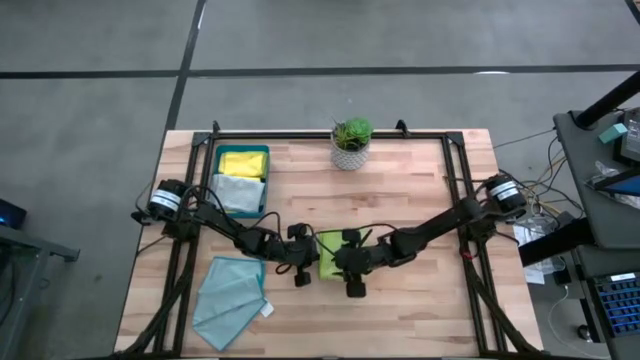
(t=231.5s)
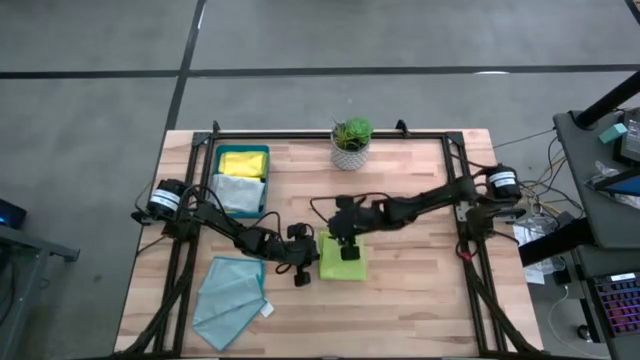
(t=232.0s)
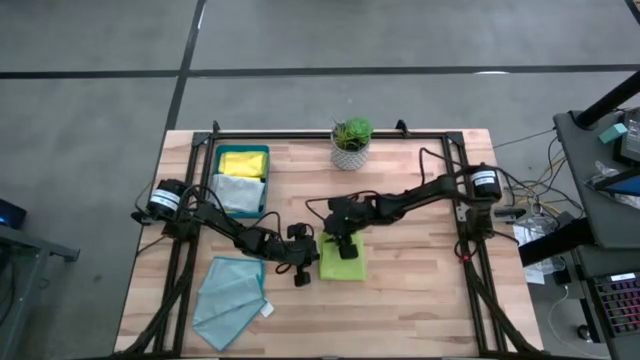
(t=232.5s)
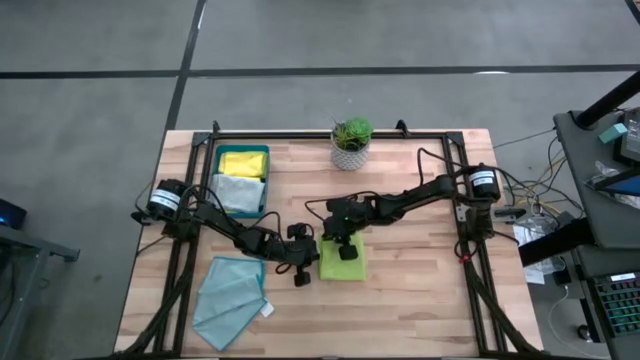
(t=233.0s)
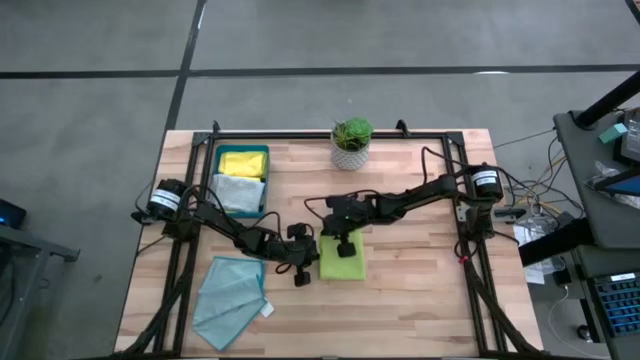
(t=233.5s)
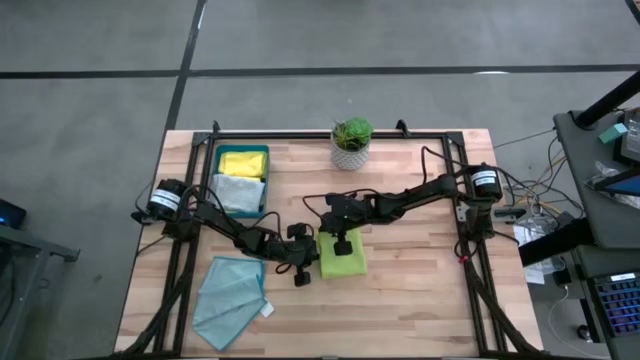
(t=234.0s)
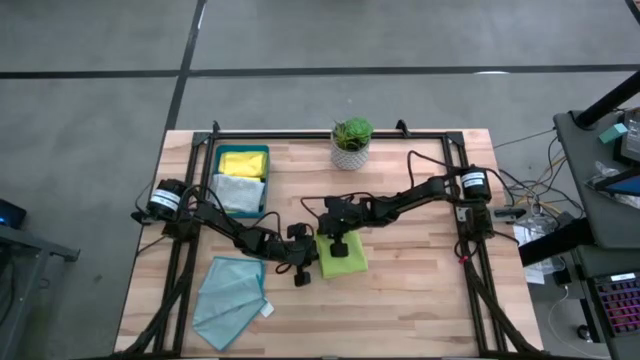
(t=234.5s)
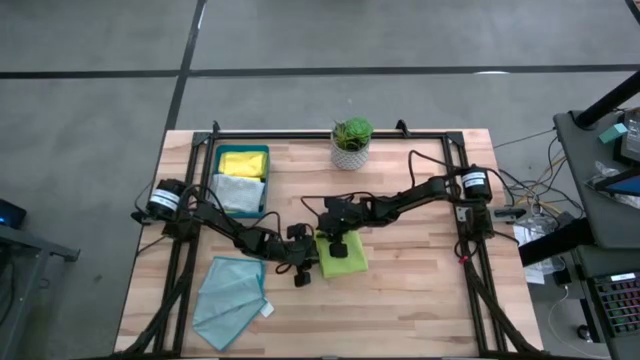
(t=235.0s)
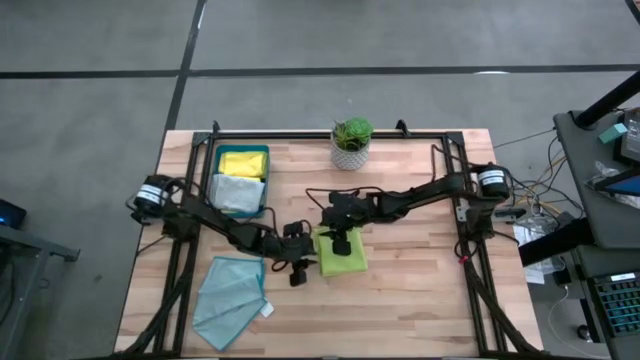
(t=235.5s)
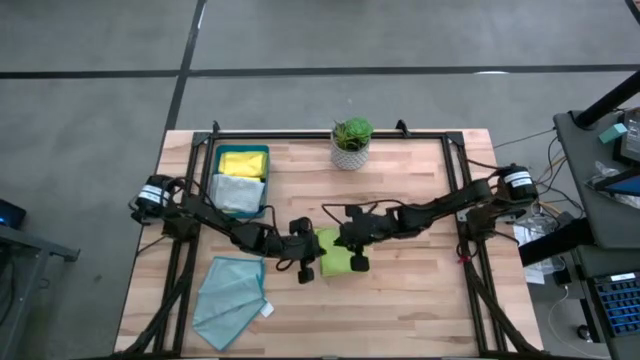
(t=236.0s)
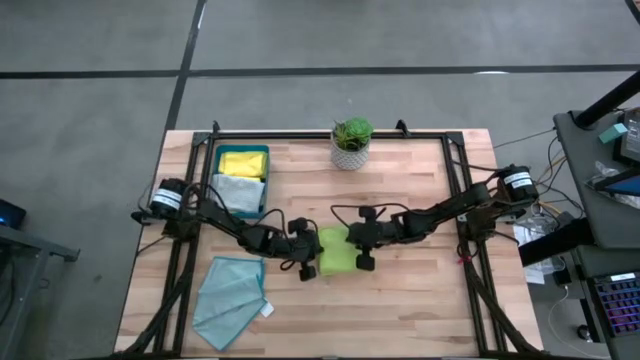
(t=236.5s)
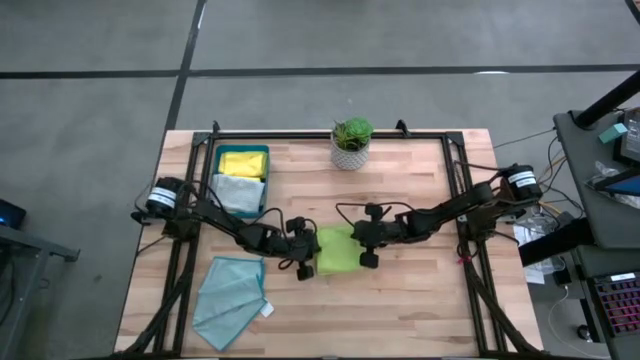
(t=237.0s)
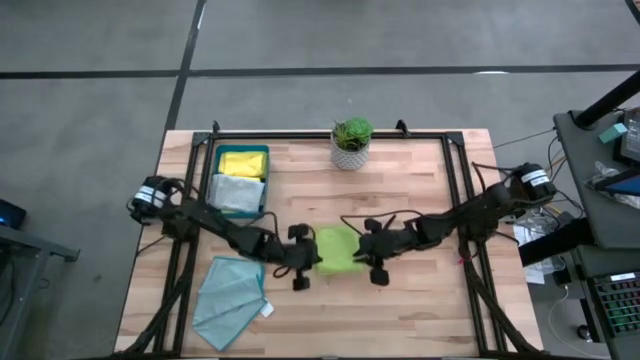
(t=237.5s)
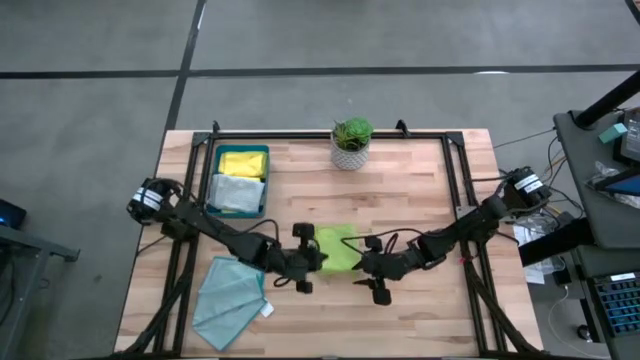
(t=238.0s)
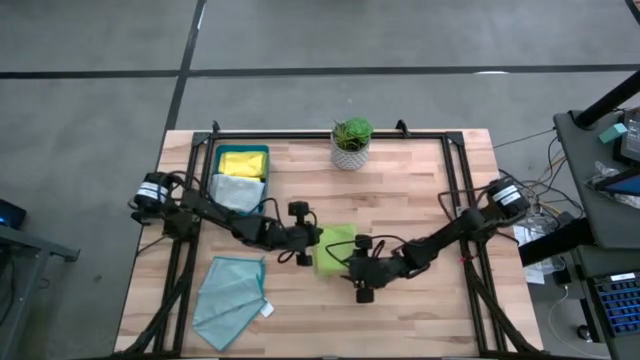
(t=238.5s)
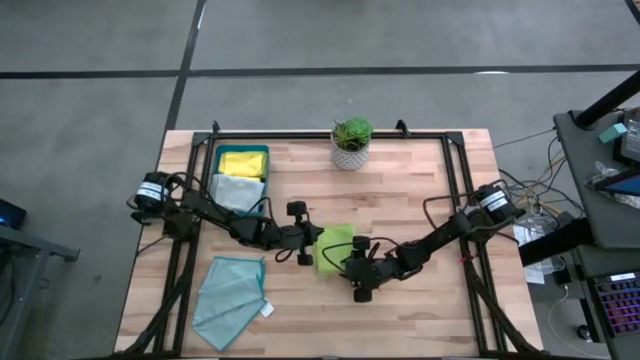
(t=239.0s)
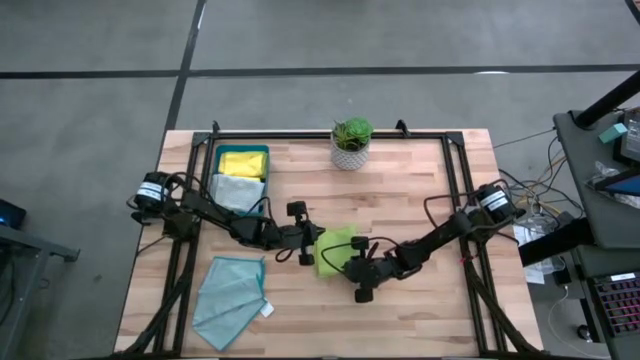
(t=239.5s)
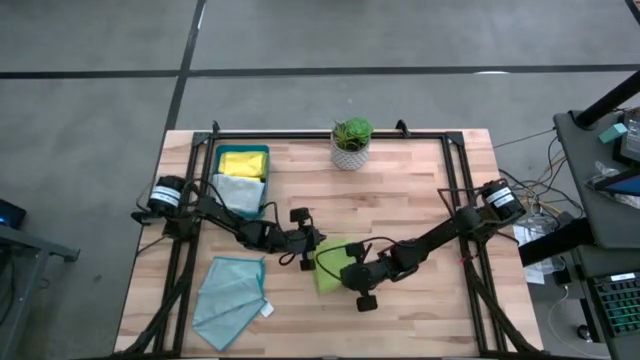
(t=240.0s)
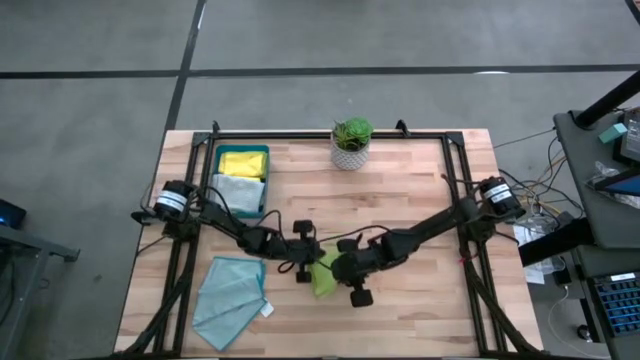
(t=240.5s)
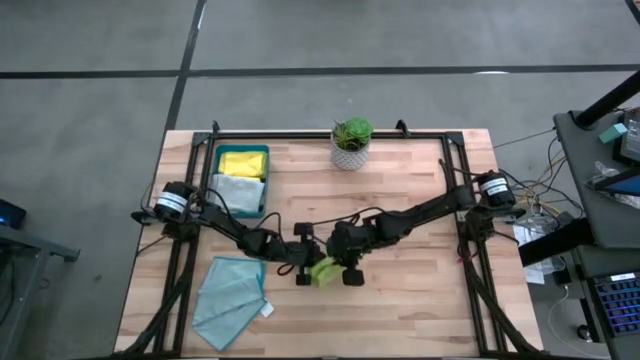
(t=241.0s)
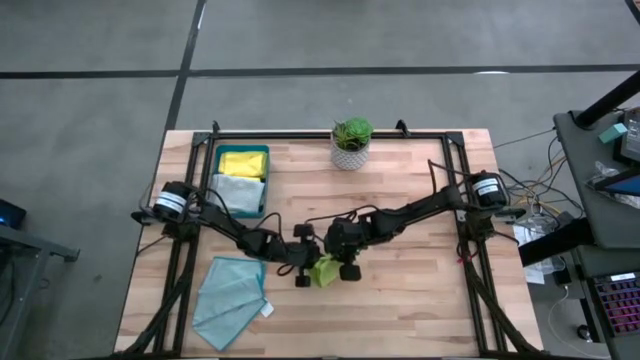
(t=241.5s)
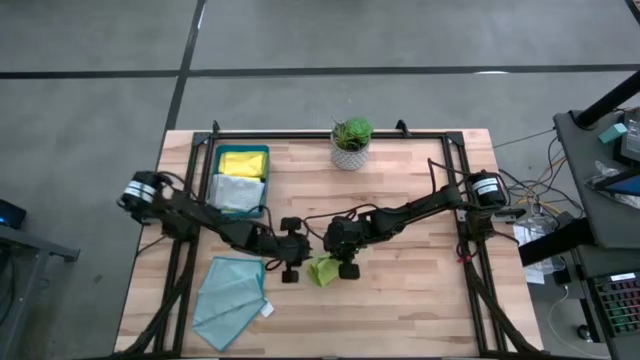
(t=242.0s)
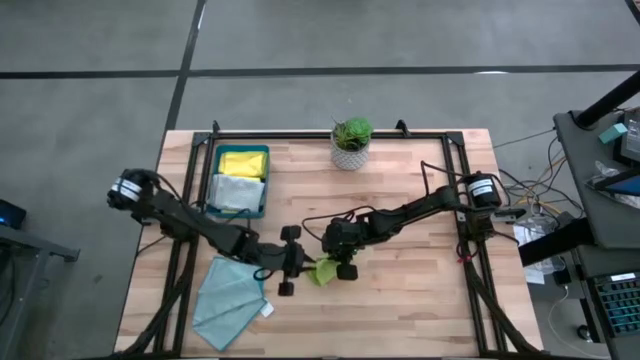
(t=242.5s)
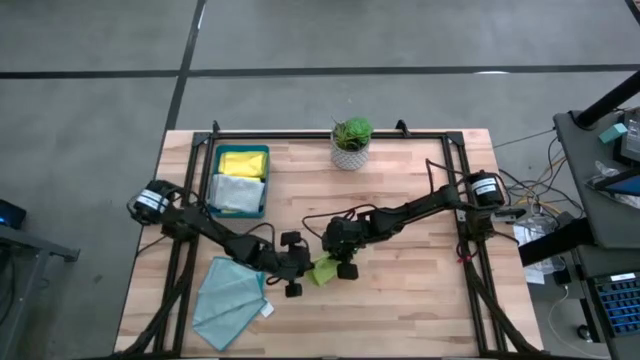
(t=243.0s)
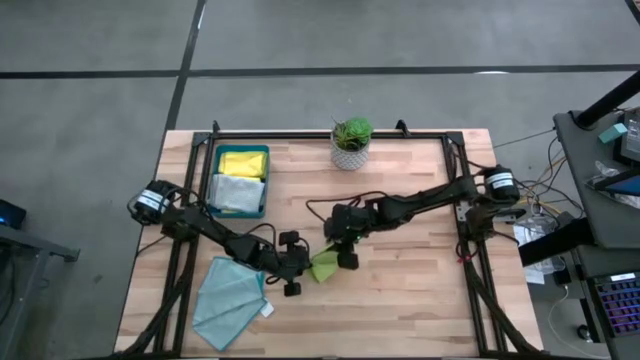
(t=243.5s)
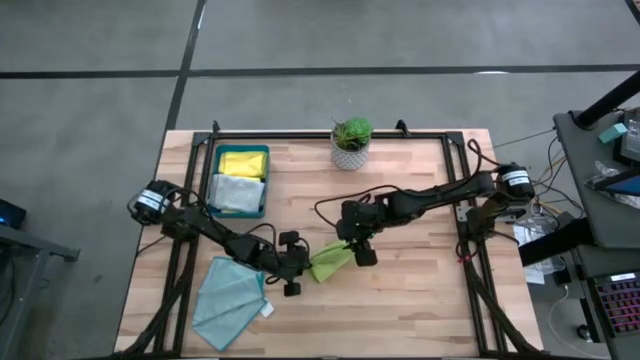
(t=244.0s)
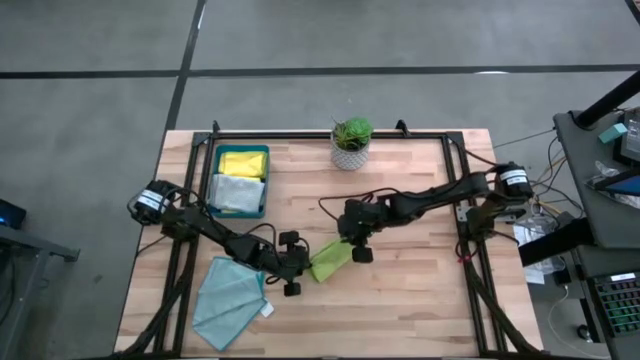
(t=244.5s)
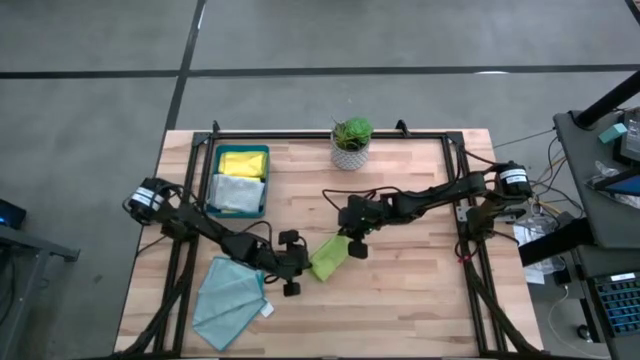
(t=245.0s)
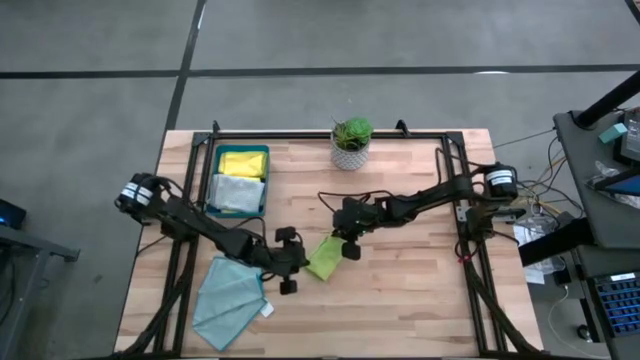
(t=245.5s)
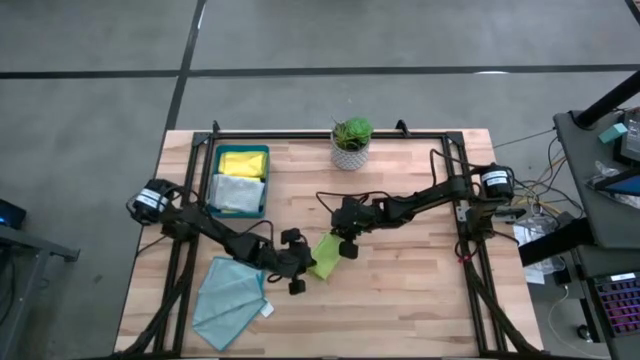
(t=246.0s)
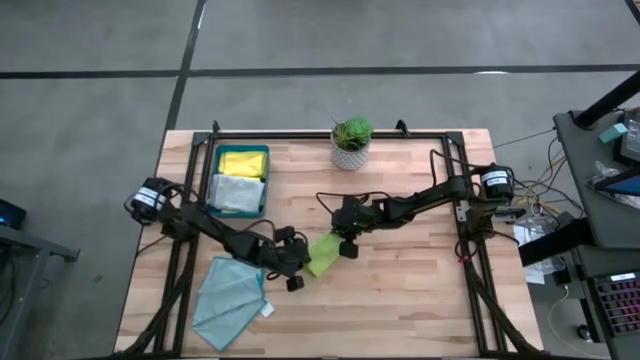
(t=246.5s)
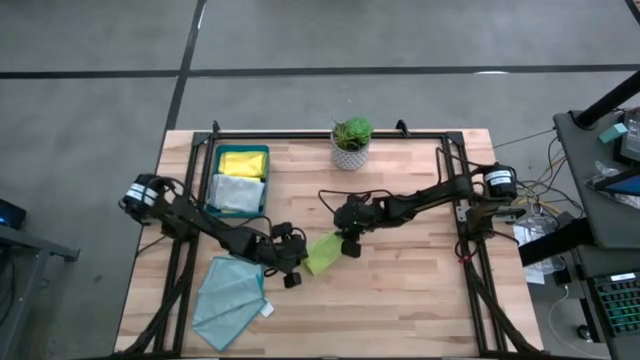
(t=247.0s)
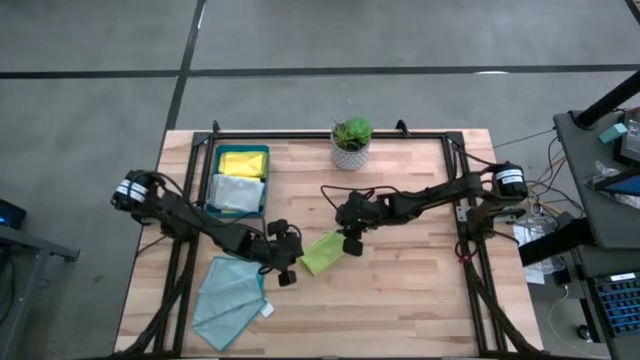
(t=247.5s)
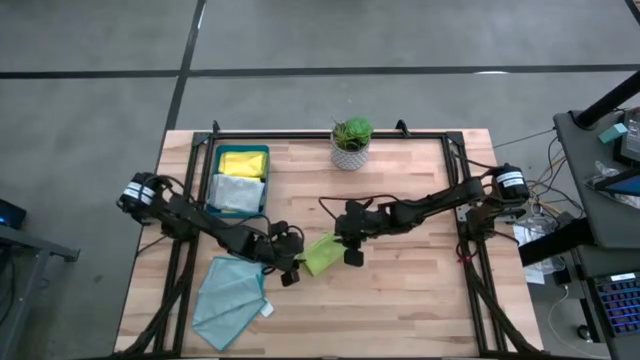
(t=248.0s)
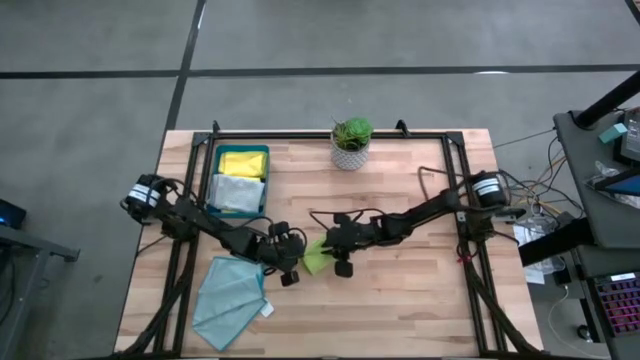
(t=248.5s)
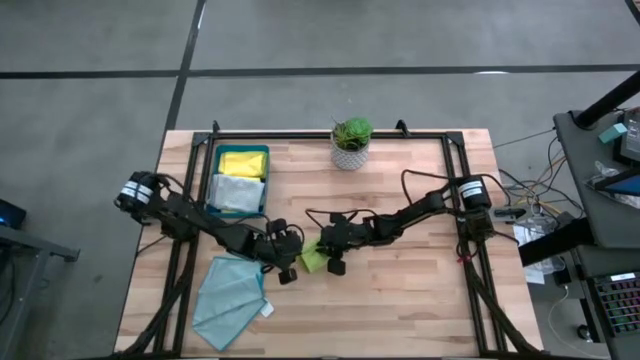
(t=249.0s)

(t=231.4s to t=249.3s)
Task: Fold microfiber towels
Fold the green towel

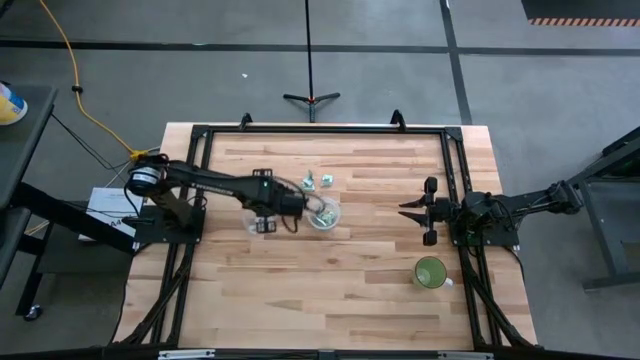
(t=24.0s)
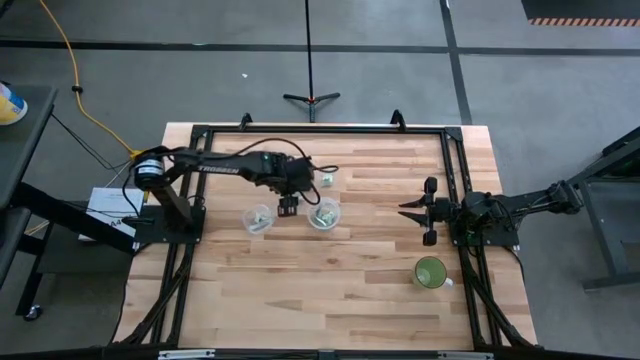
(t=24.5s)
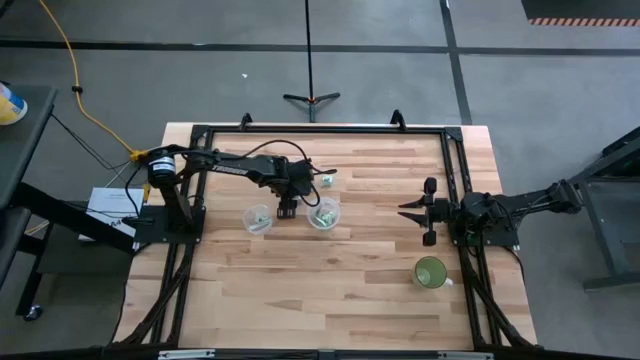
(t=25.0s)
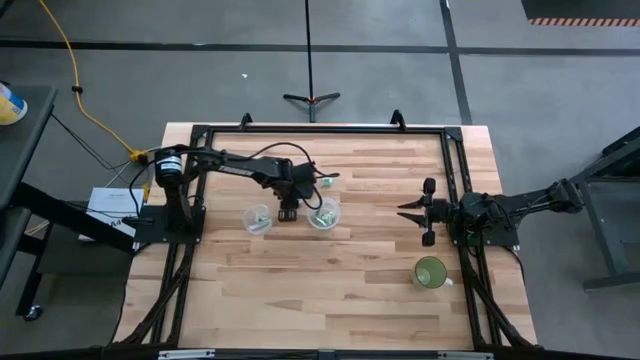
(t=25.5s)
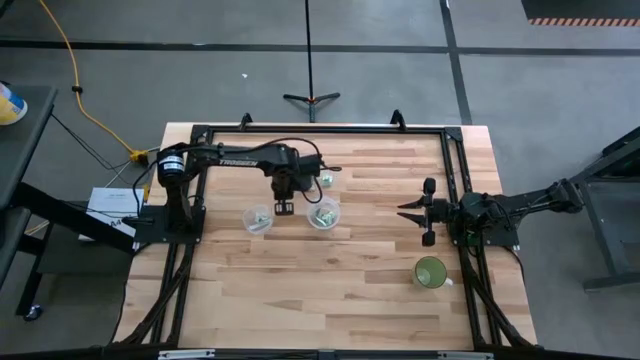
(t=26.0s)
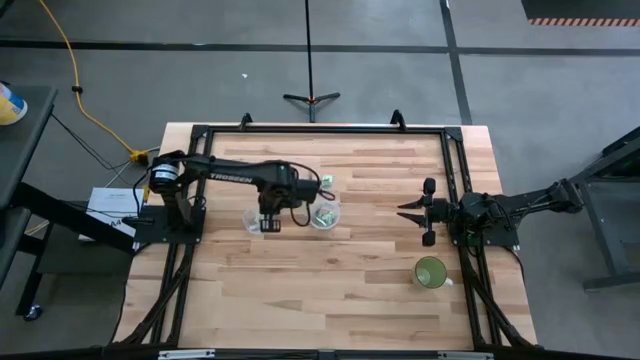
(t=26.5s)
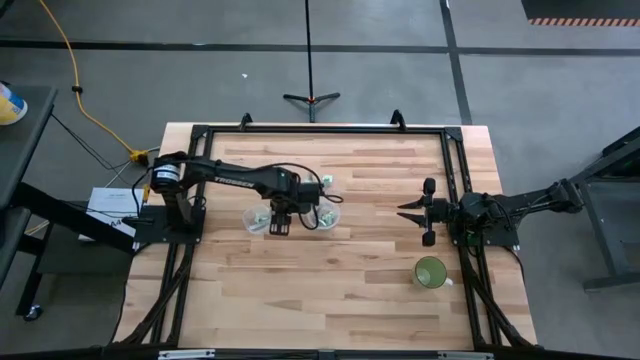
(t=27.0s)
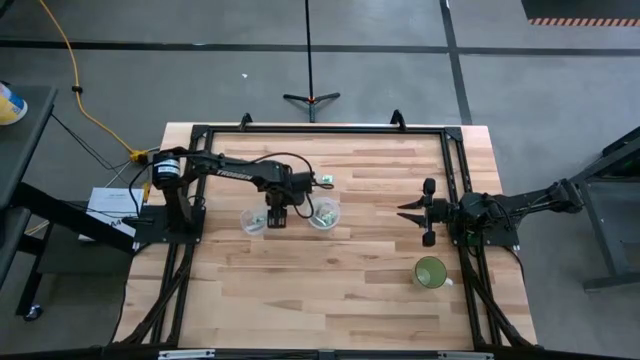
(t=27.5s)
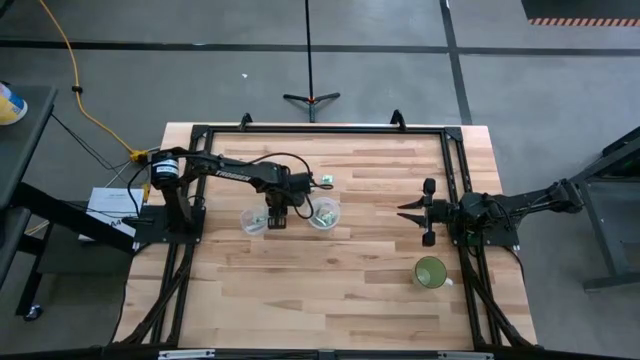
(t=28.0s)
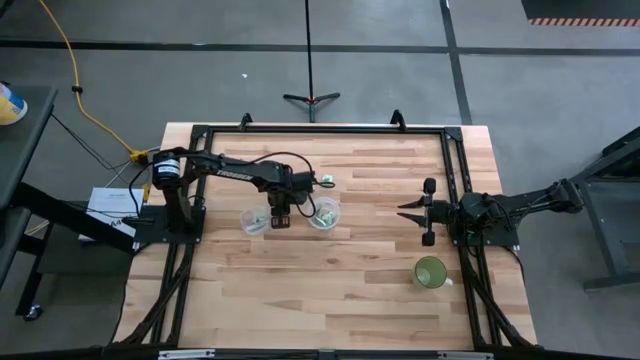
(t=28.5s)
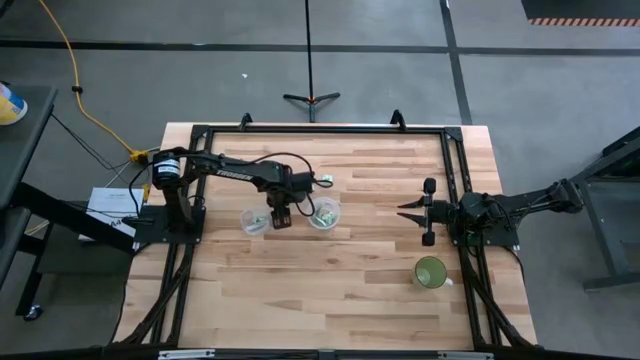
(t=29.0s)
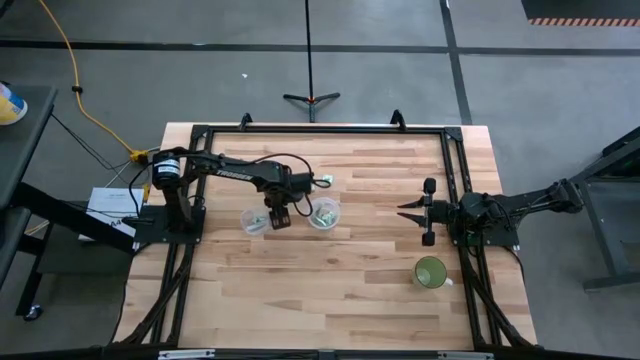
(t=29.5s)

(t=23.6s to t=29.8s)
Task: Pick and place Stevia / Truvia into bins
Put the white stevia packet into the left transparent container
